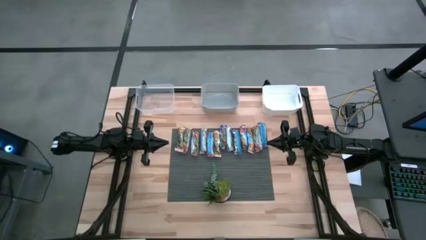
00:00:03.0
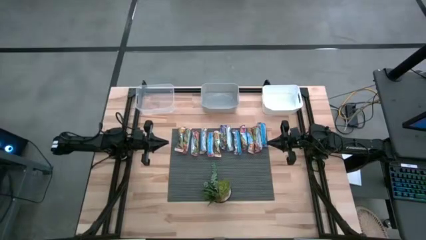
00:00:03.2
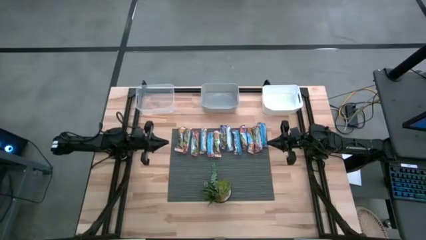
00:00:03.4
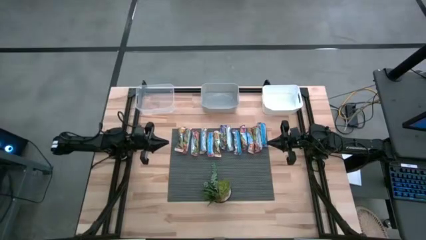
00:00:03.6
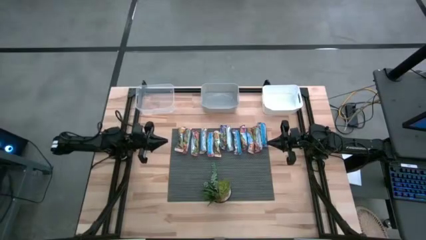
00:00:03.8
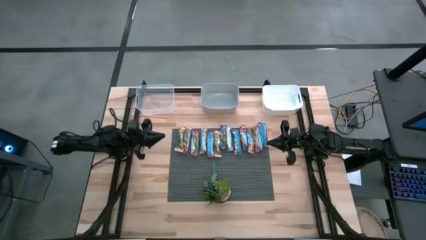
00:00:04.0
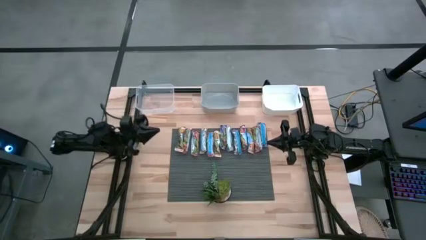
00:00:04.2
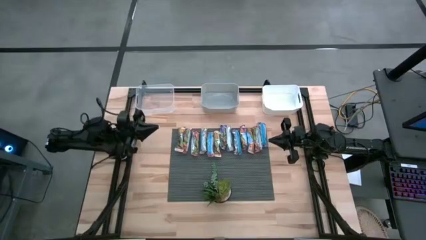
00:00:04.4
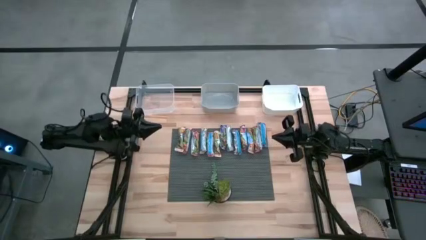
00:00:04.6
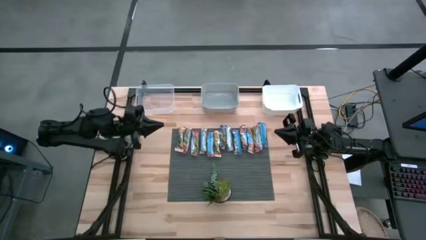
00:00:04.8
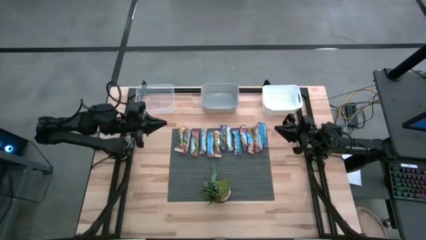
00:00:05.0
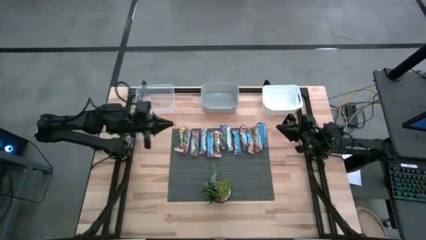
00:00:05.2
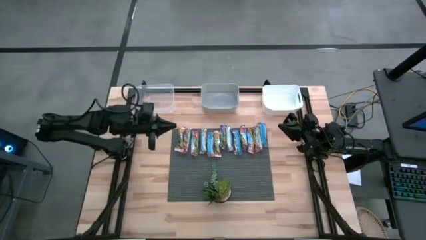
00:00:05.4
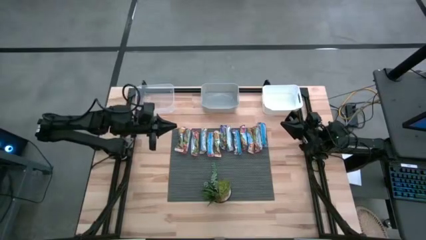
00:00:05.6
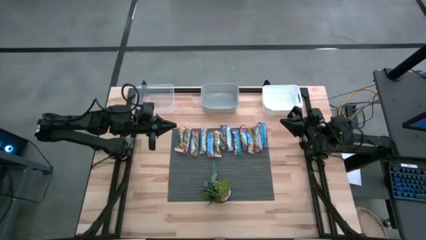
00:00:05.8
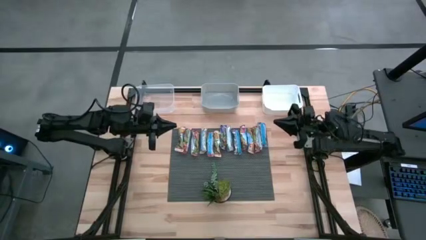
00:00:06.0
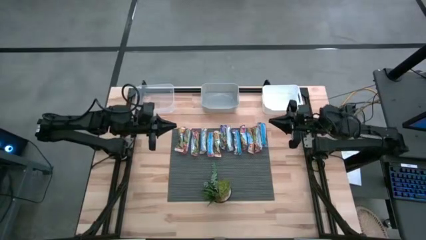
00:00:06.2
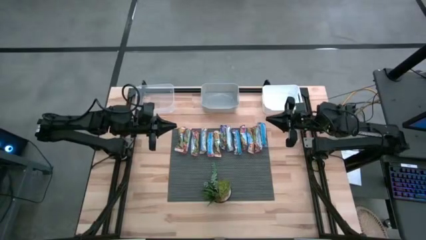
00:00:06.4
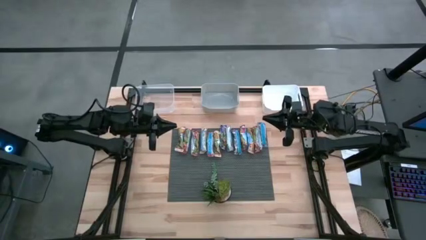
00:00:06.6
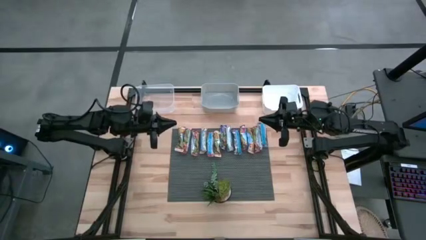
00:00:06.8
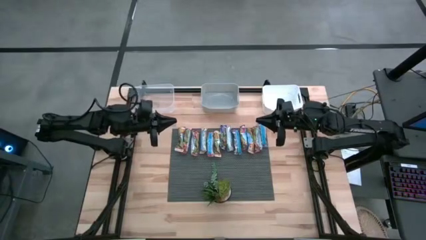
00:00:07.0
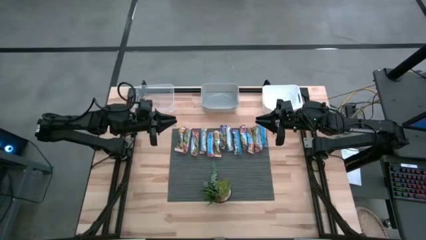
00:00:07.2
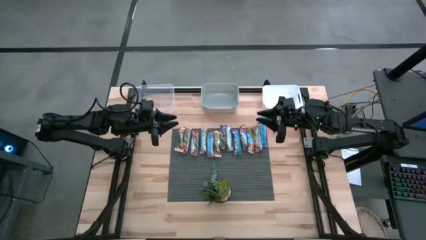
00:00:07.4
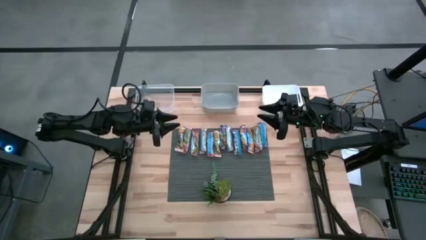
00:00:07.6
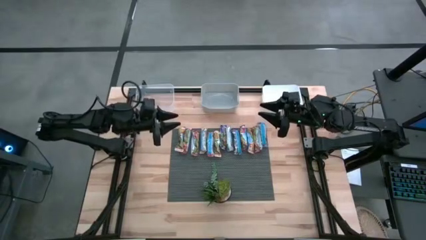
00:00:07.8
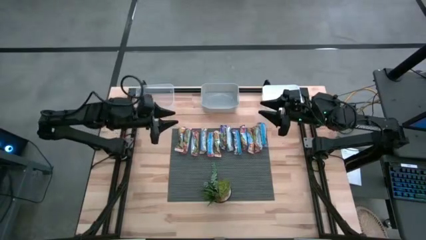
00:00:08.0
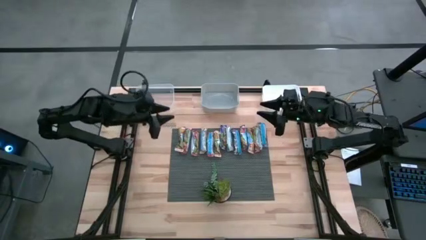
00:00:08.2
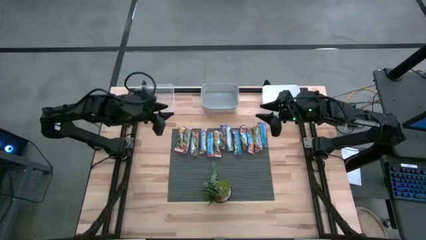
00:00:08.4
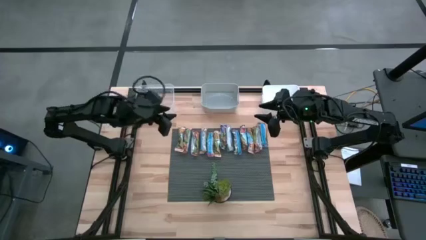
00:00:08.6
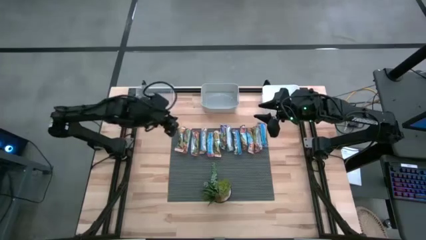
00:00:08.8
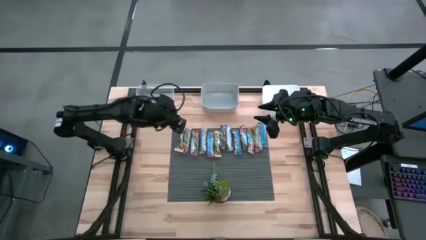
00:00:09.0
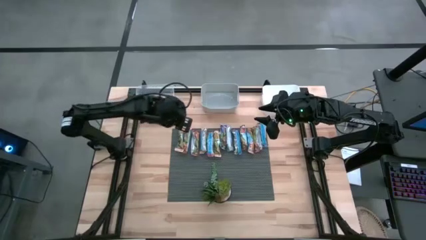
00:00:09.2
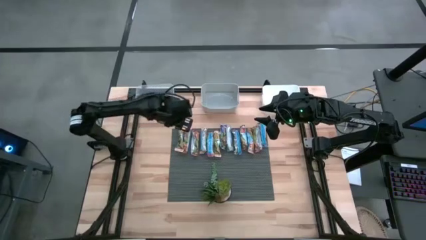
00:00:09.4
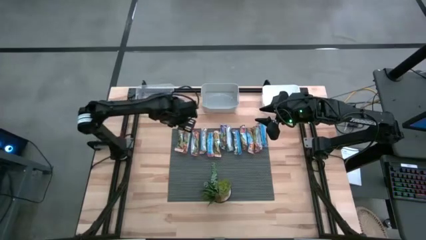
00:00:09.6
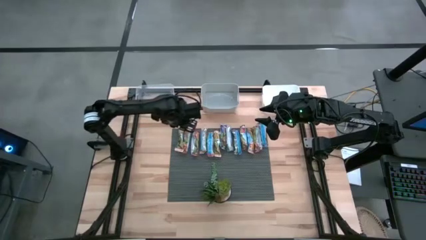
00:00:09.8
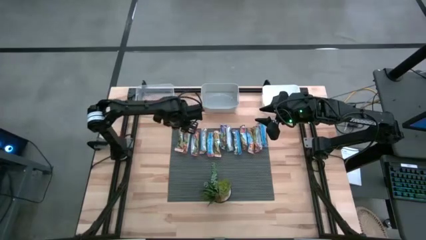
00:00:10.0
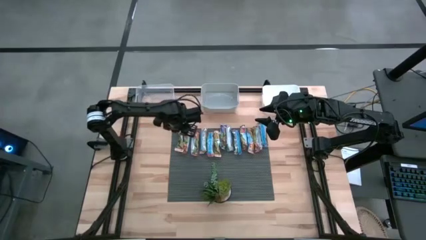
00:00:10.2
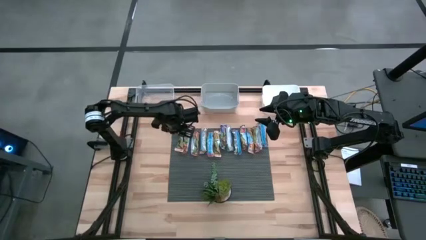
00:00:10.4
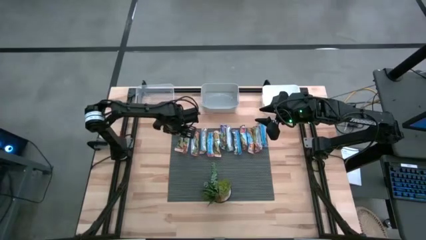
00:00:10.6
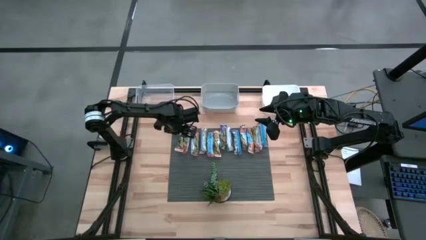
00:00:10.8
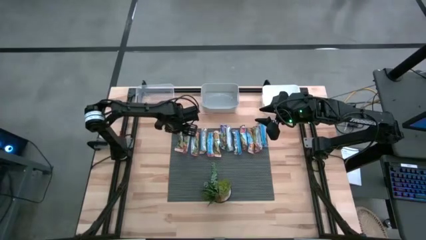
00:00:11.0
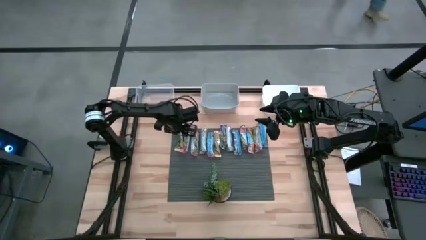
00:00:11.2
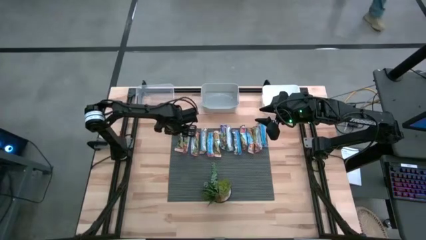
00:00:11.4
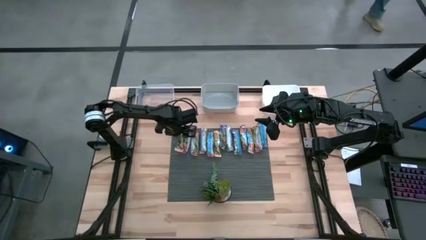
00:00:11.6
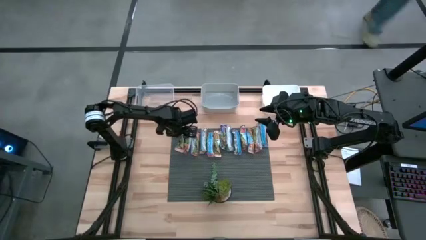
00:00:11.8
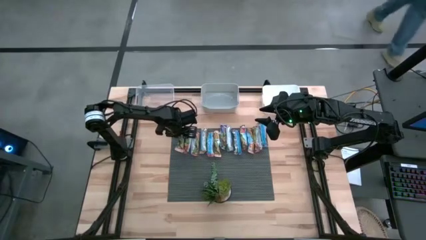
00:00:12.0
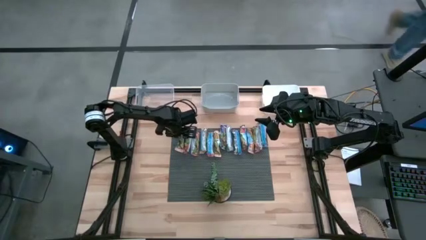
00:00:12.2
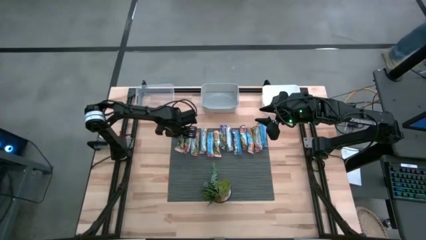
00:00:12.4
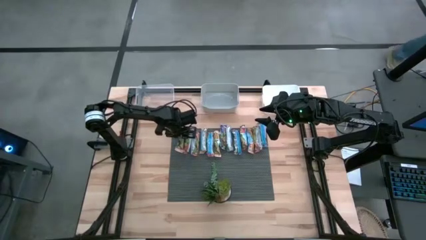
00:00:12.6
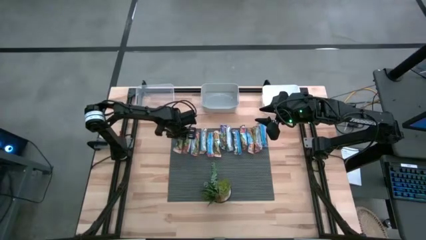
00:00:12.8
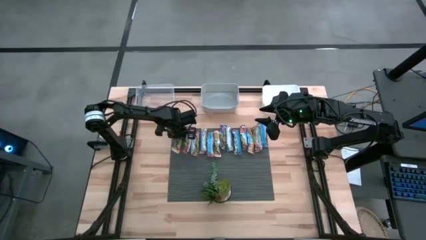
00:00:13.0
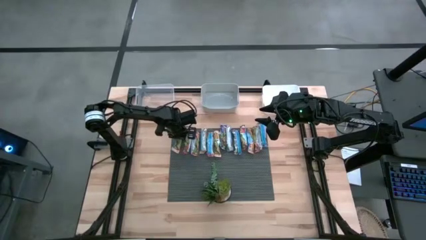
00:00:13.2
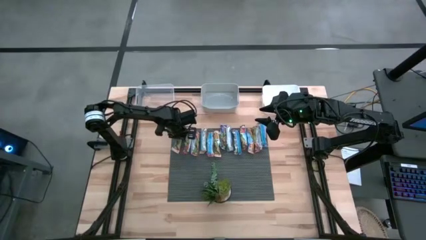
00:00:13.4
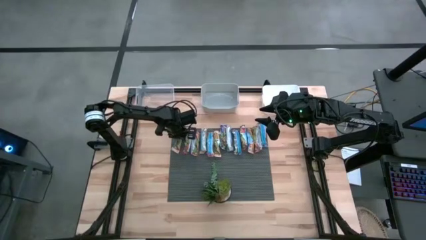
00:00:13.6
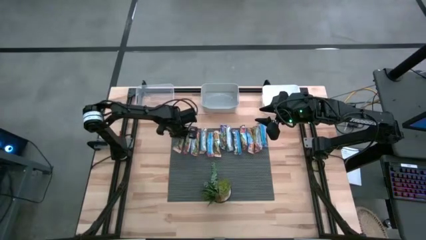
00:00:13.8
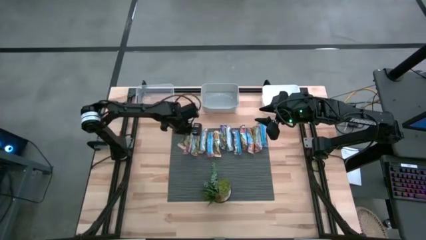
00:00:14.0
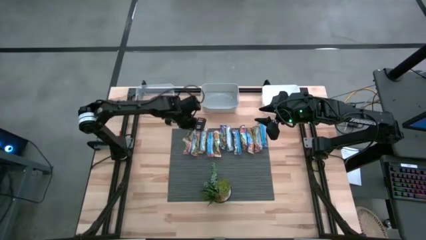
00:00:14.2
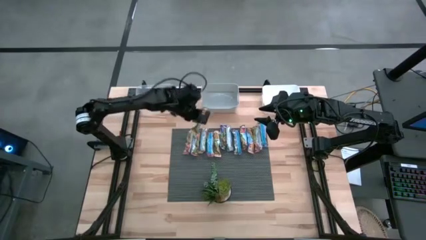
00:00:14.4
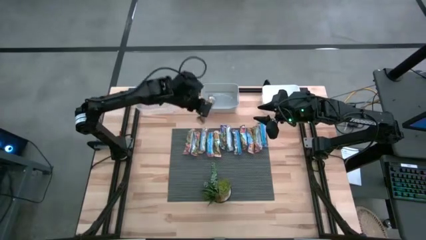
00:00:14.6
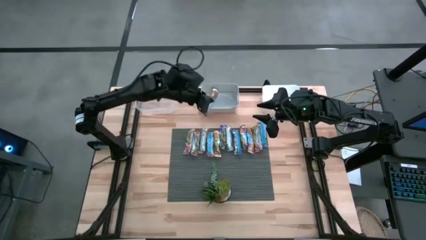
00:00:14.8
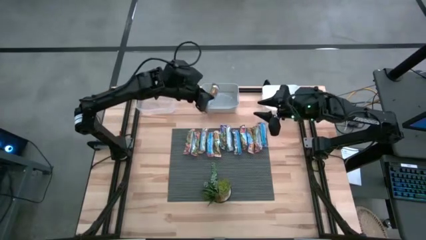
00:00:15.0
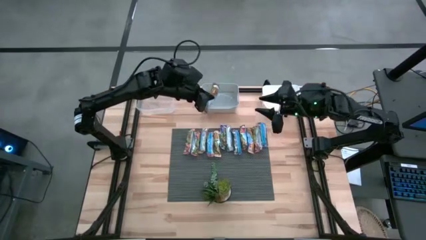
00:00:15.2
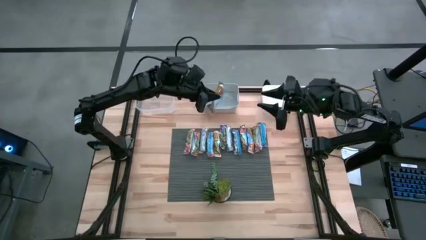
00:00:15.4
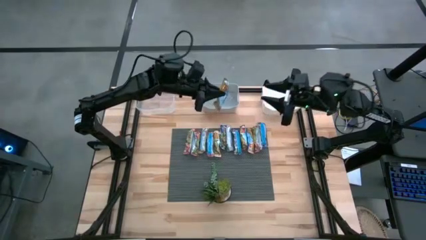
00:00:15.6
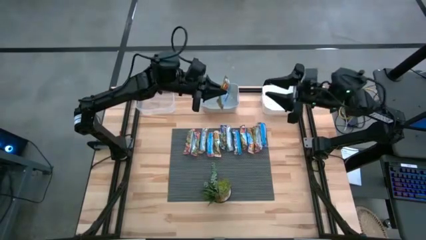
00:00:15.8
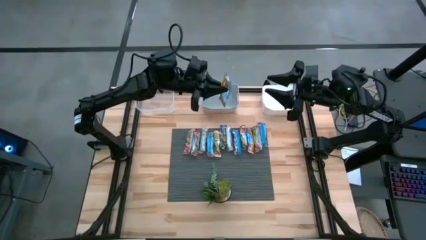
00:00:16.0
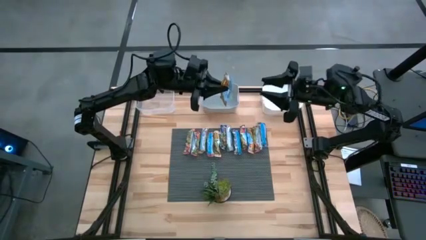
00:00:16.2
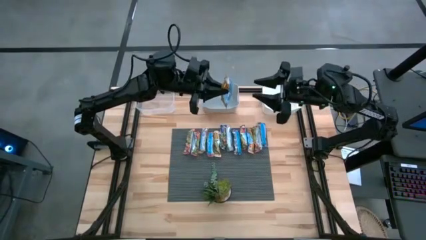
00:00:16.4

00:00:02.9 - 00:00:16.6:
Task: Pick and place Granola Bars by type
Put the yellow granola bar into the white bin

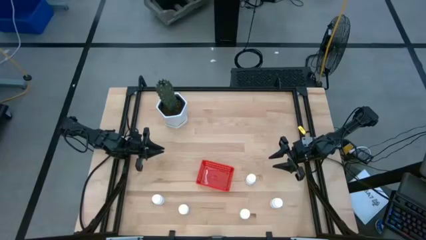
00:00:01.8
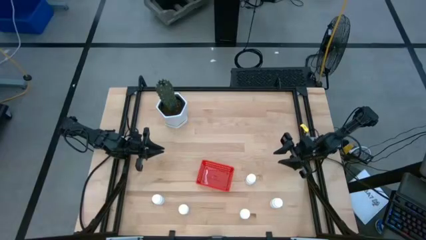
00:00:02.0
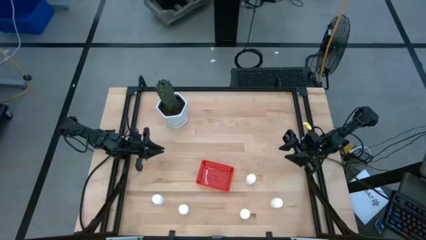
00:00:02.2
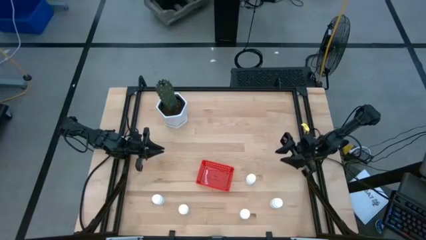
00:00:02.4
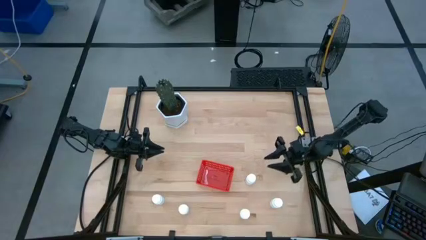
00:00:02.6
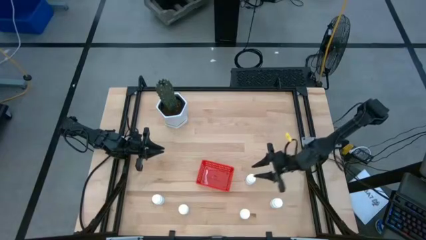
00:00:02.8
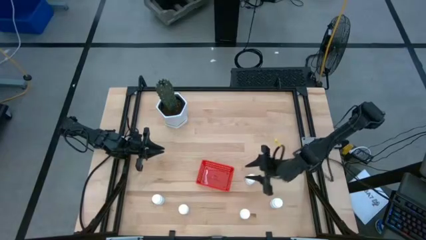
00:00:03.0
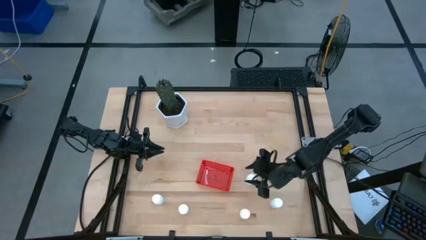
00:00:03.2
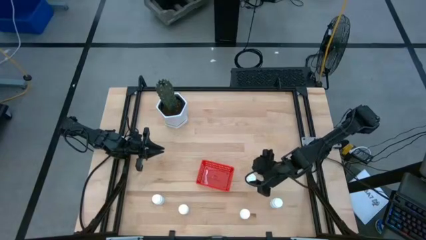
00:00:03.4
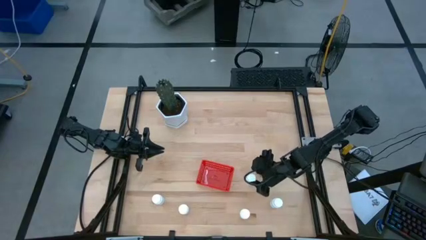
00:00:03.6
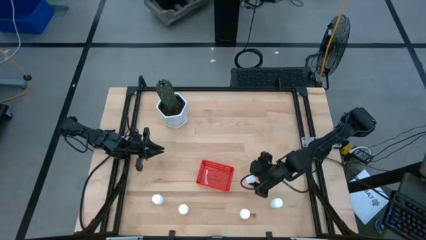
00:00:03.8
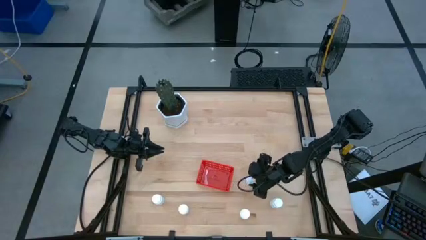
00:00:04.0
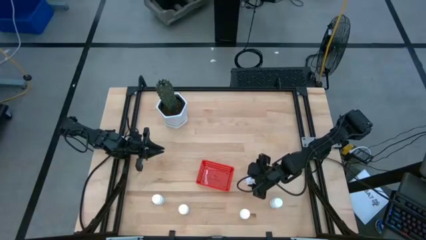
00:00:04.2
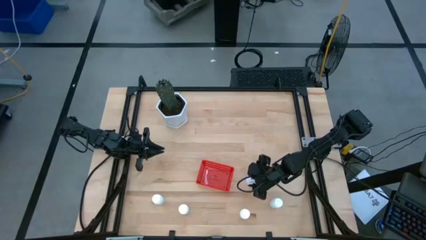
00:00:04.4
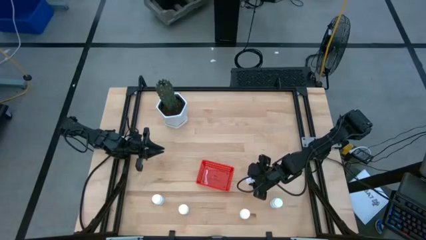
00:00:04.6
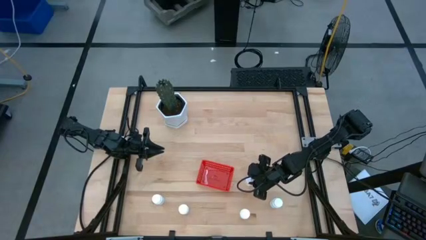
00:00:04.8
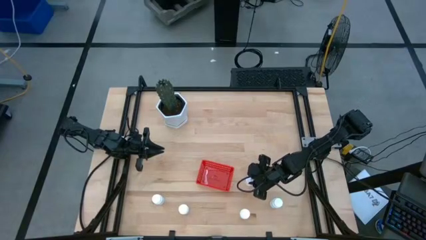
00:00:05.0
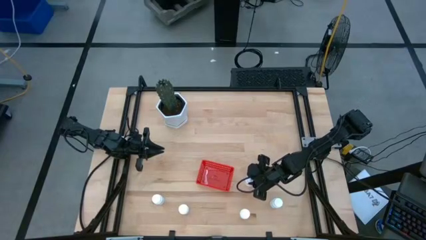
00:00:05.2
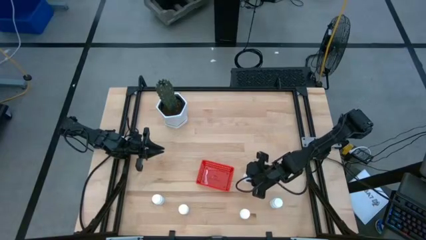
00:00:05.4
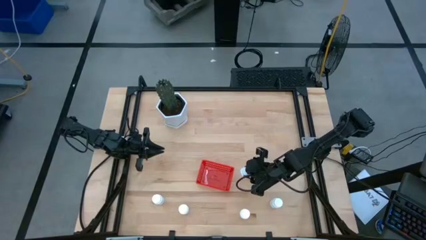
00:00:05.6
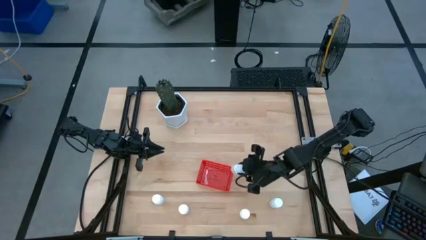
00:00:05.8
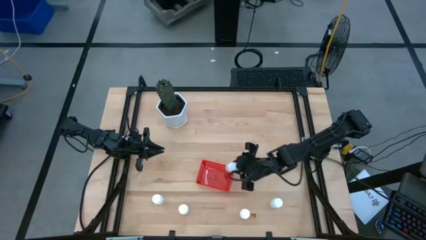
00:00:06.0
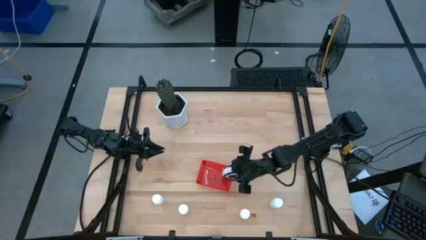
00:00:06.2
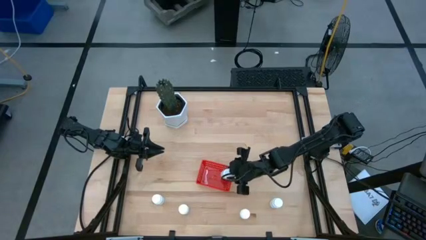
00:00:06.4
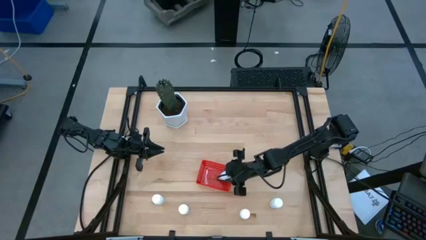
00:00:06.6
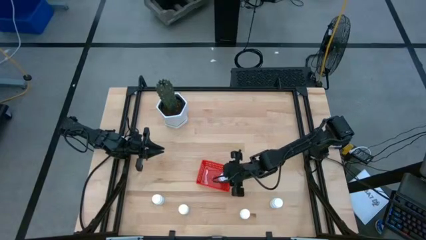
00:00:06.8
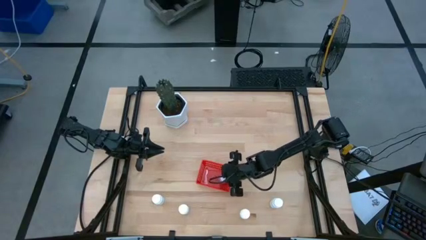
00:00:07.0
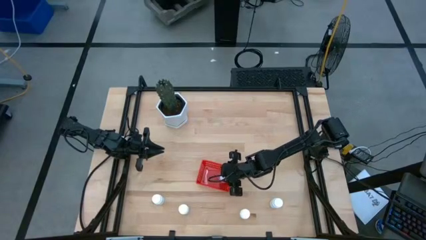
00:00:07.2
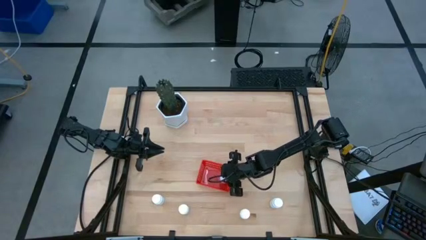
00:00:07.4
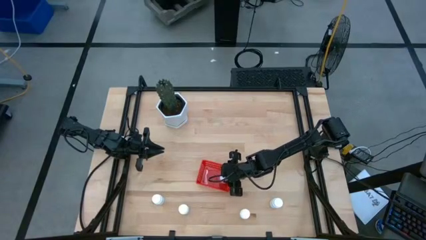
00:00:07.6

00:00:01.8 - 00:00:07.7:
Task: Pick and place pill bottles into a basket
Put the white pill bottle into the red bin
